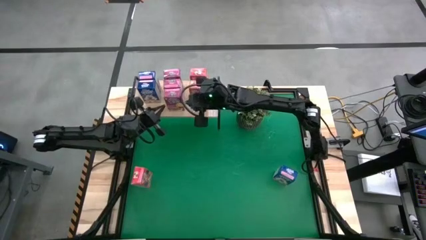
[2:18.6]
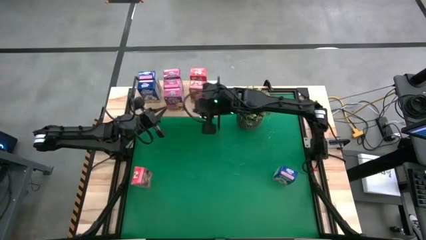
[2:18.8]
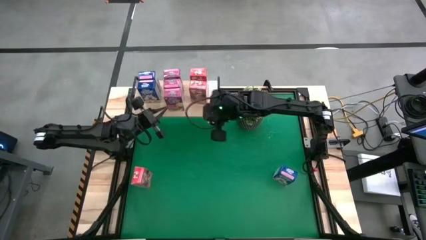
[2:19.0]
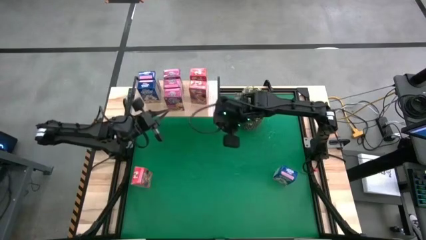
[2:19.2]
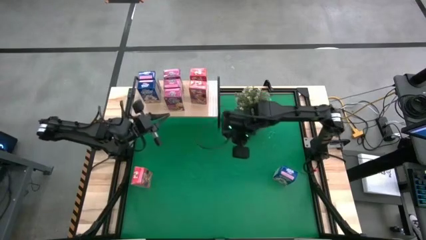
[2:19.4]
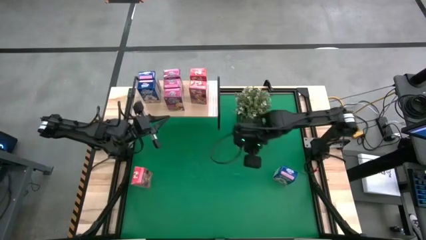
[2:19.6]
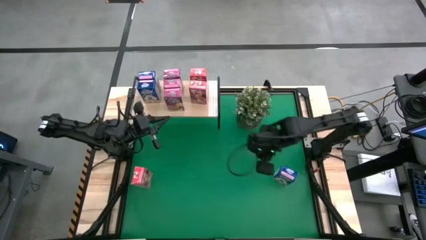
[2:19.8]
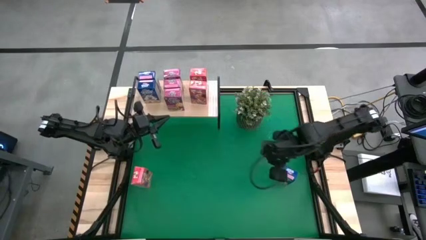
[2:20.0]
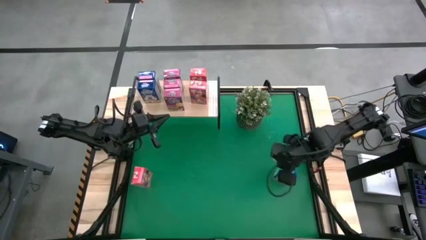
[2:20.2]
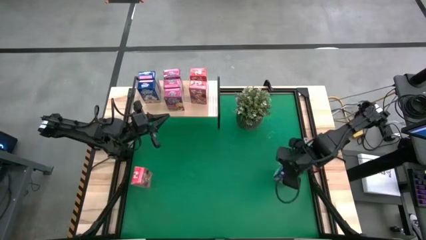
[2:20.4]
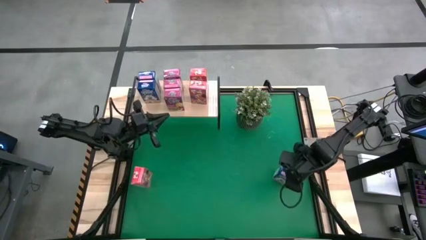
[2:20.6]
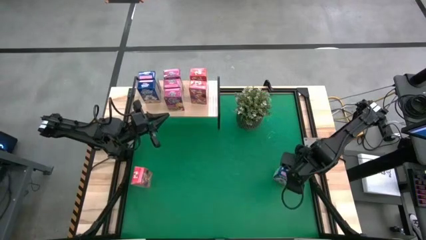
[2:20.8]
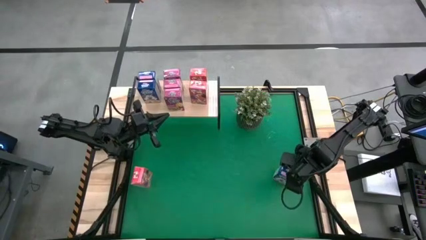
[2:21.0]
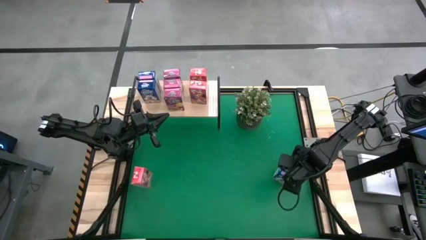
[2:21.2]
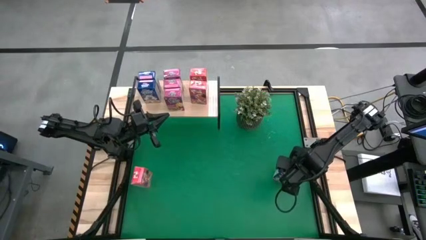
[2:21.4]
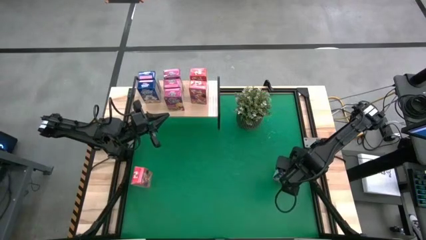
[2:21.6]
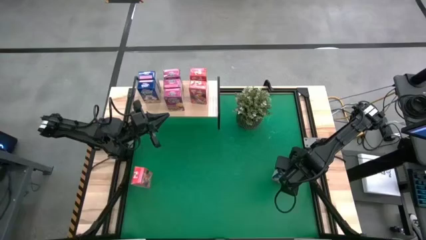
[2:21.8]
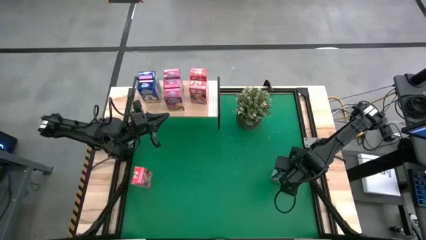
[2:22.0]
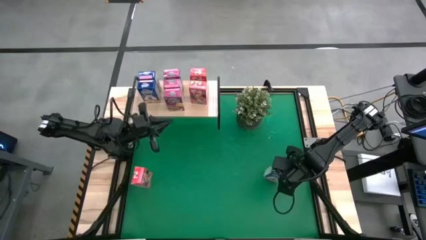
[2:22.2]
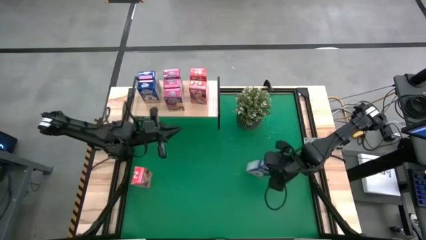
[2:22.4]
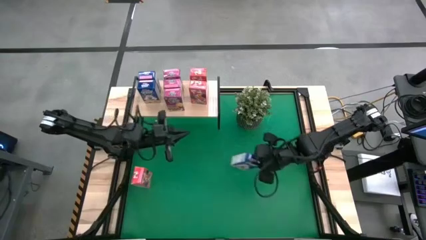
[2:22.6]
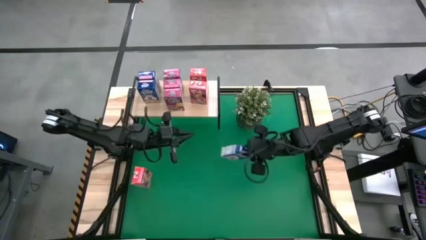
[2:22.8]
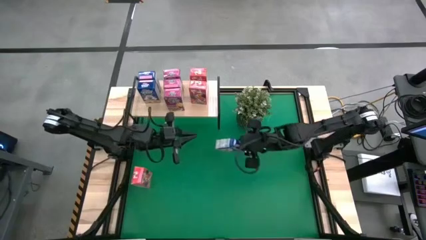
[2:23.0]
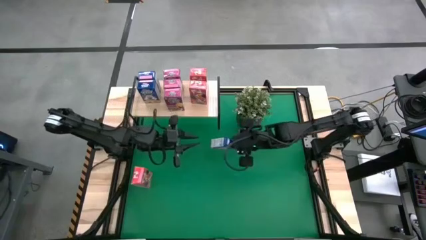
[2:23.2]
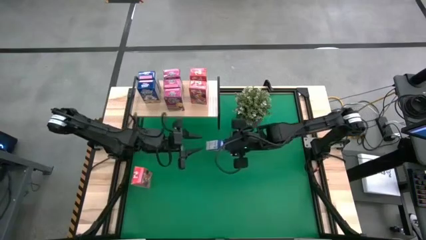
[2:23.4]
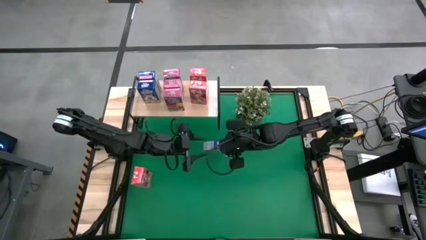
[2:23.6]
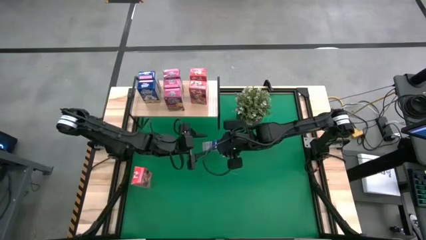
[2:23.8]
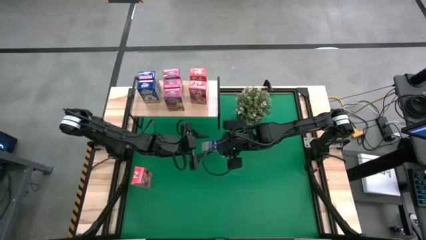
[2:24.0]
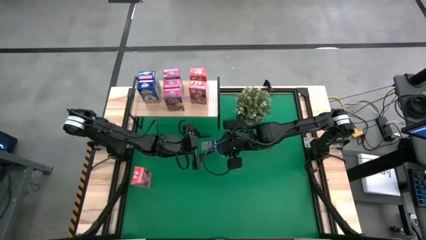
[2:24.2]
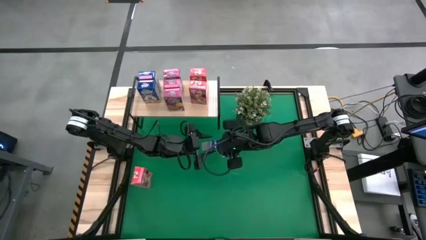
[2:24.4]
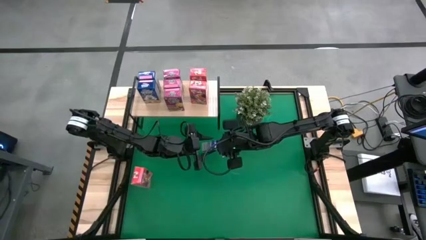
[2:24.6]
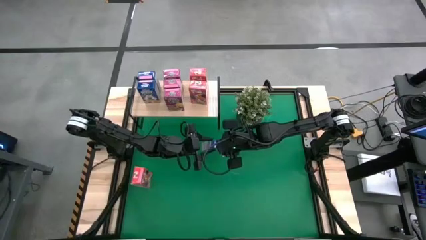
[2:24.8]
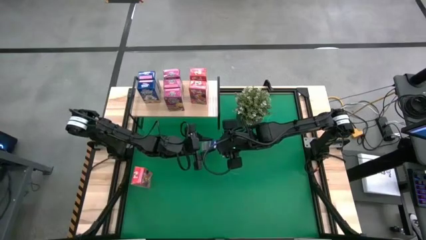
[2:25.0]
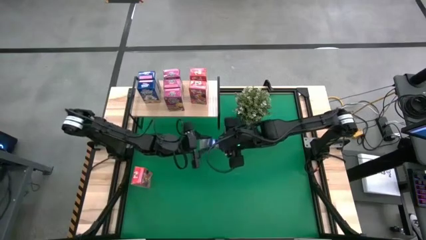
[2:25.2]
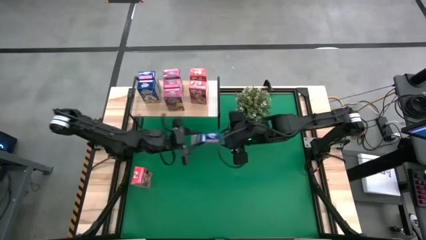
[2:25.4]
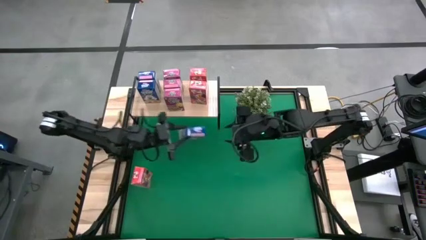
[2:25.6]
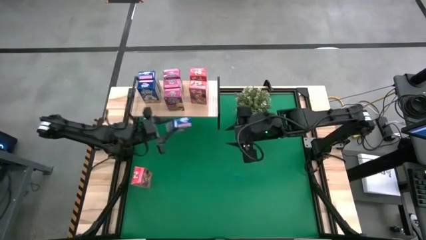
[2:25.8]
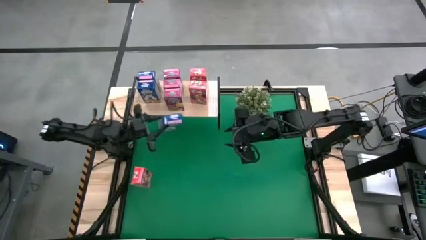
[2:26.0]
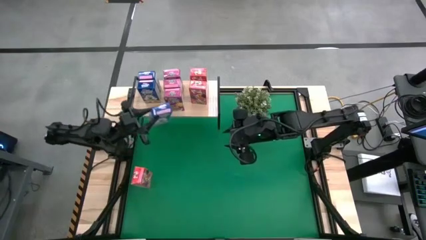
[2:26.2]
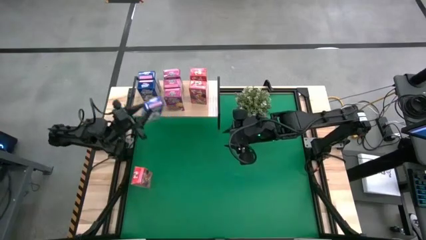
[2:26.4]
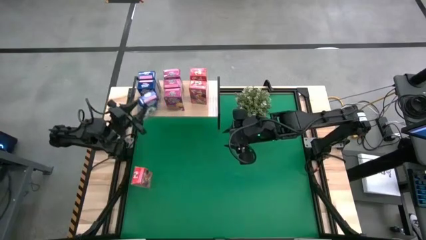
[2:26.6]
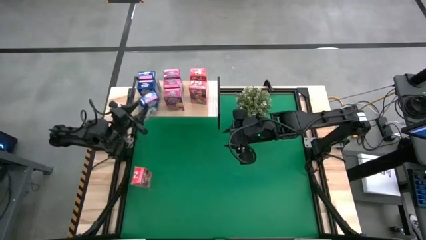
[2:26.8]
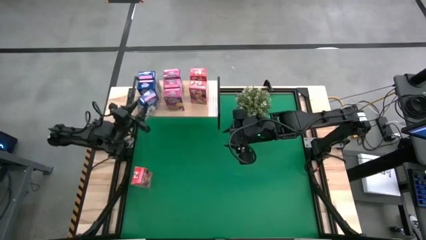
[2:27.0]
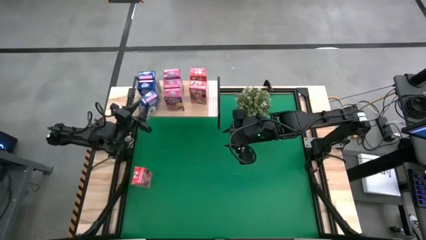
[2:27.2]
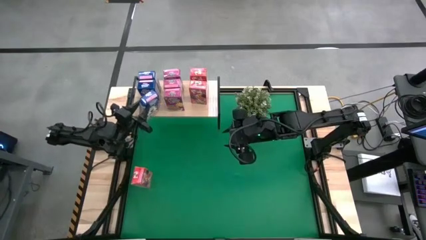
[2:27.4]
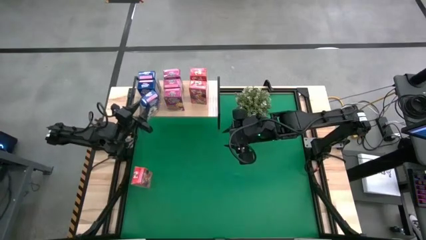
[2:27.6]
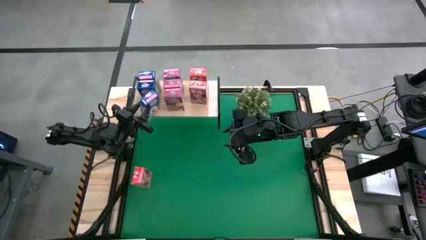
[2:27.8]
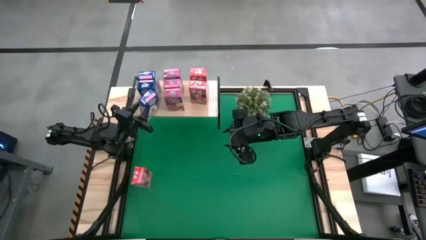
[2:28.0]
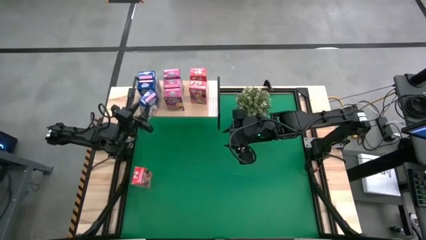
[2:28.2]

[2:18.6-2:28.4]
Task: Stack cereal on shelf
Put the blue cereal box on the shelf

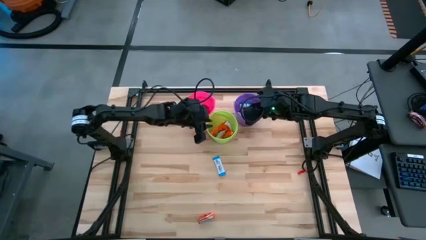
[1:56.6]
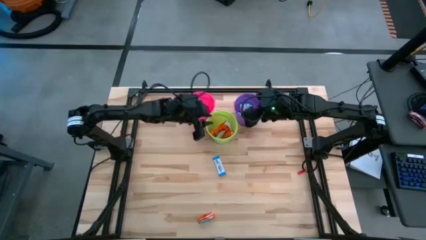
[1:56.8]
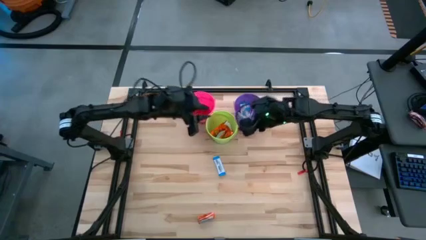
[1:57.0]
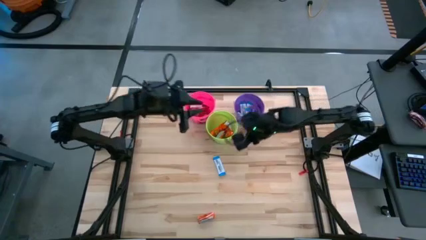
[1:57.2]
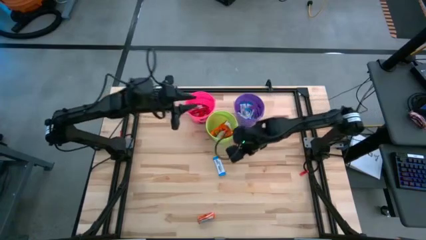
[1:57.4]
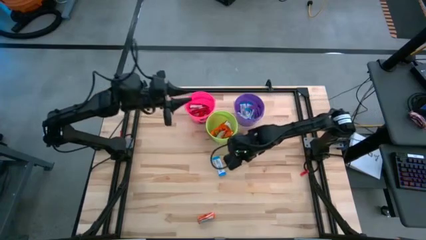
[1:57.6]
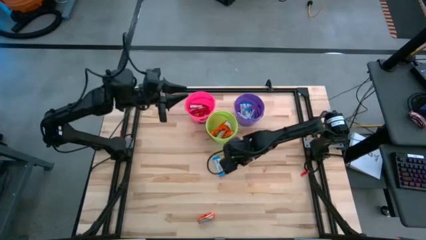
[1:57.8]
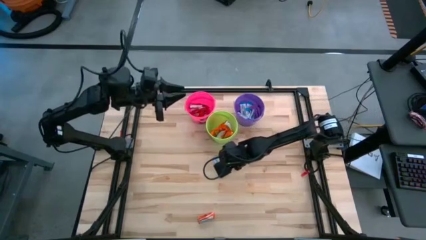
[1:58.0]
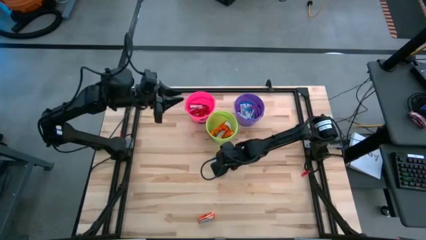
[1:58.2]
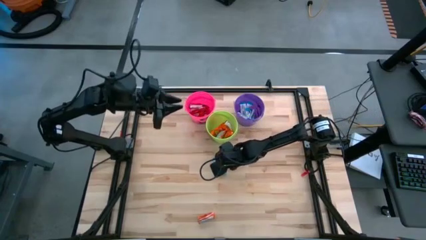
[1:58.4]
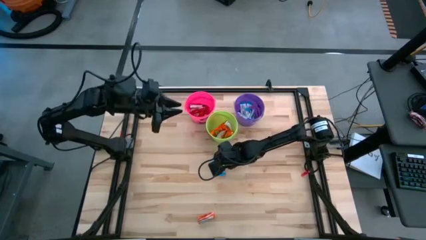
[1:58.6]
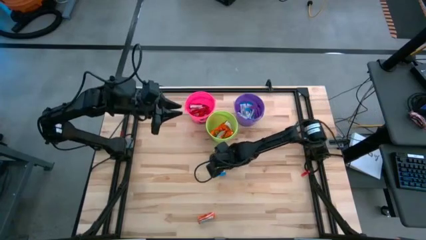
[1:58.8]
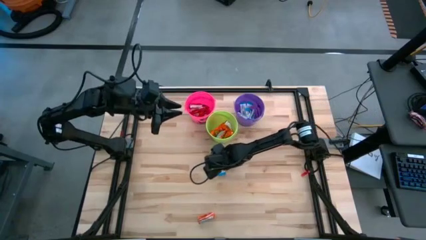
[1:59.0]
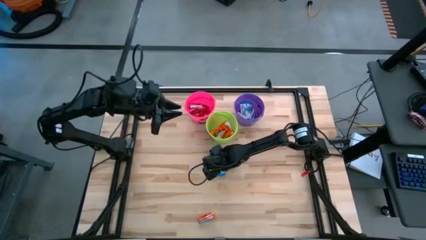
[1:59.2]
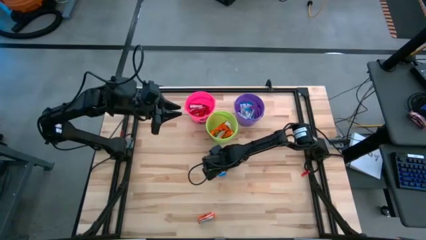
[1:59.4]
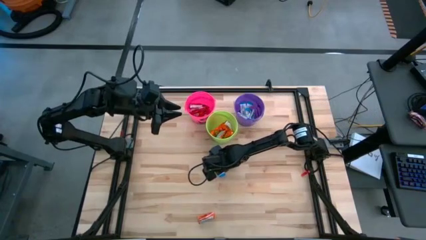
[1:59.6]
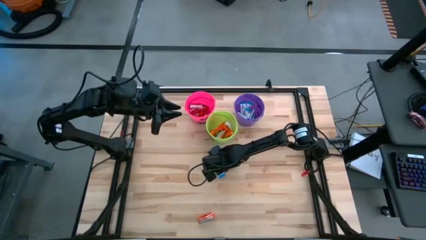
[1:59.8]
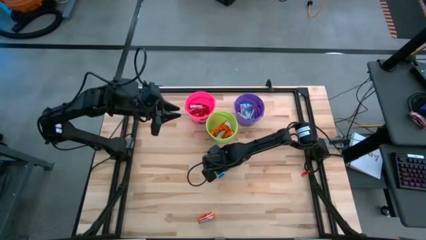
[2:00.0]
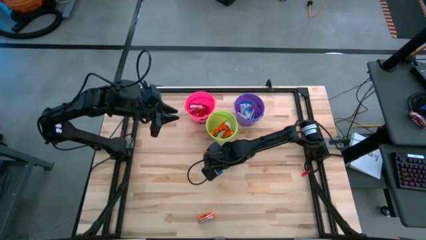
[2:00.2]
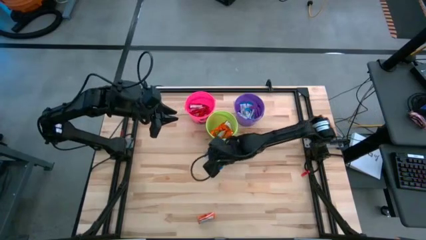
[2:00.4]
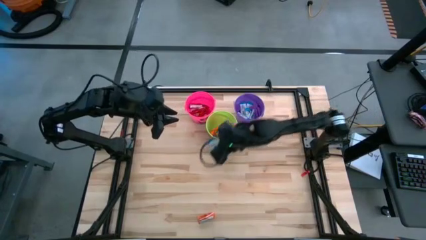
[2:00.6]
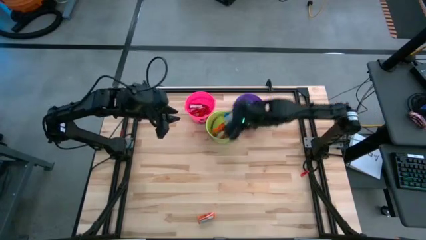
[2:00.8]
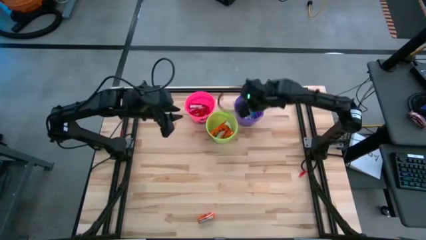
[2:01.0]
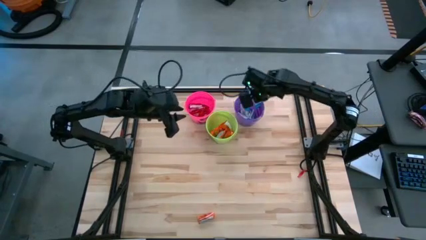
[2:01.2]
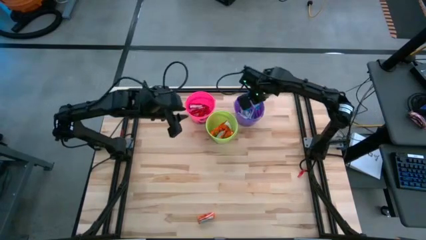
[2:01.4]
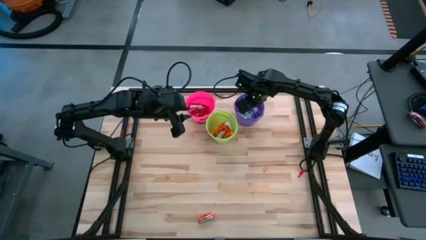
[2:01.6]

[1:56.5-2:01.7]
Task: Sort candy
Put the blue candy into the violet bin
